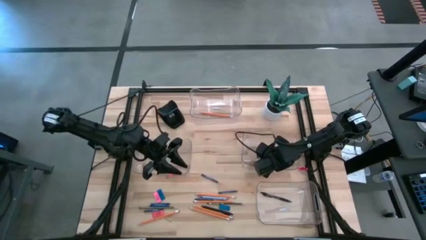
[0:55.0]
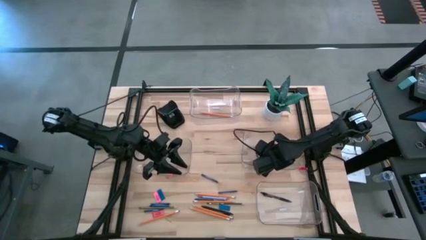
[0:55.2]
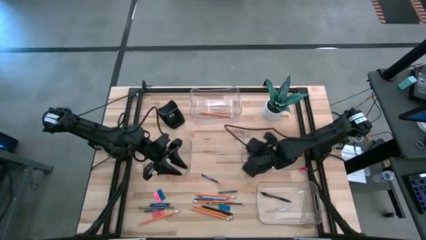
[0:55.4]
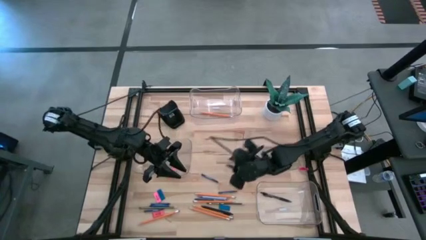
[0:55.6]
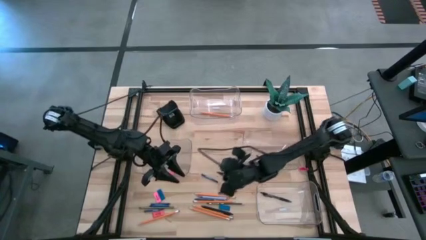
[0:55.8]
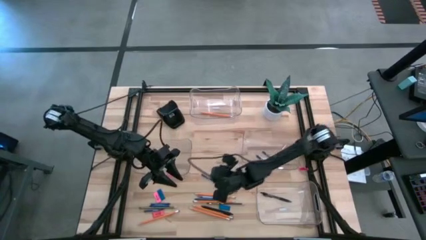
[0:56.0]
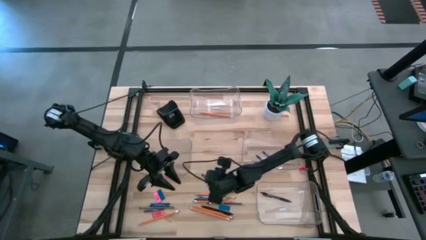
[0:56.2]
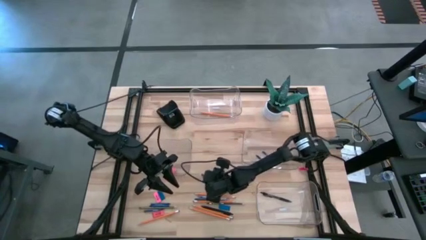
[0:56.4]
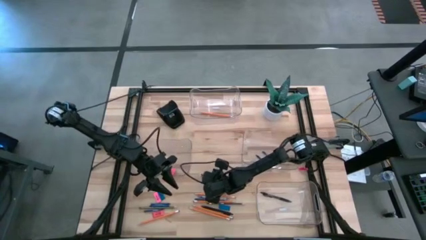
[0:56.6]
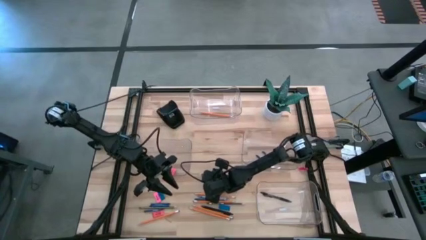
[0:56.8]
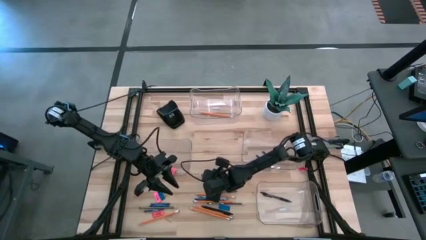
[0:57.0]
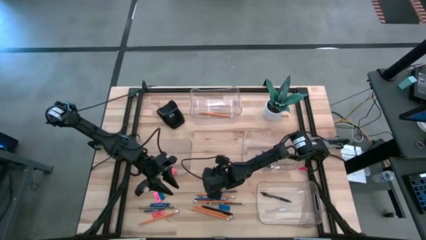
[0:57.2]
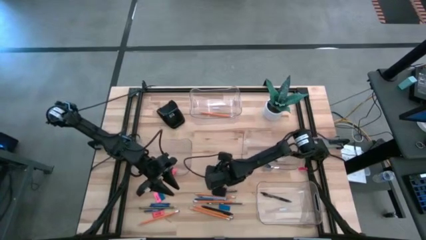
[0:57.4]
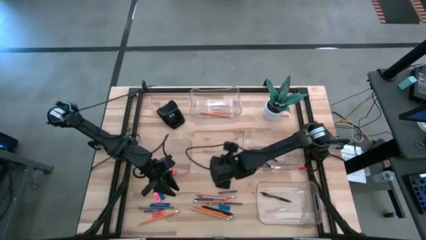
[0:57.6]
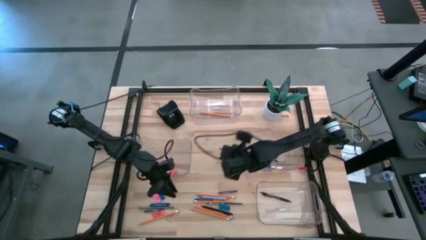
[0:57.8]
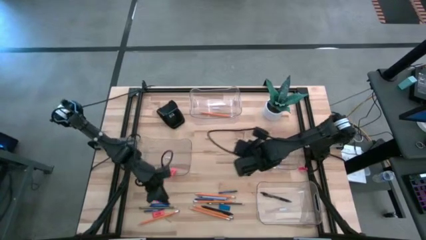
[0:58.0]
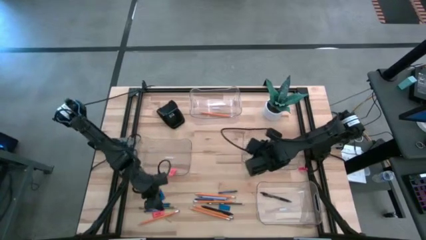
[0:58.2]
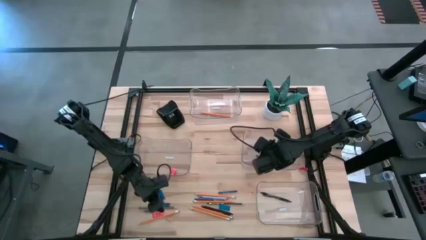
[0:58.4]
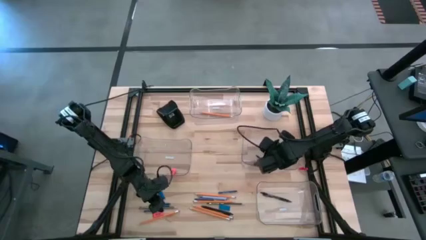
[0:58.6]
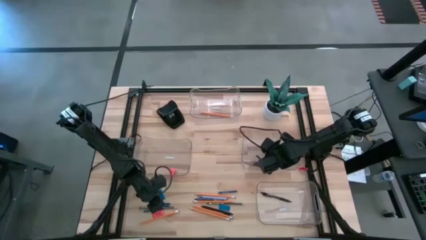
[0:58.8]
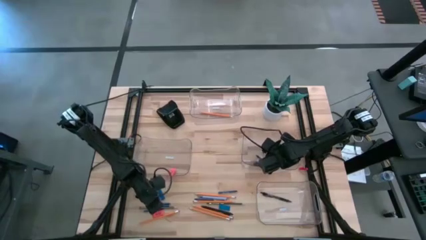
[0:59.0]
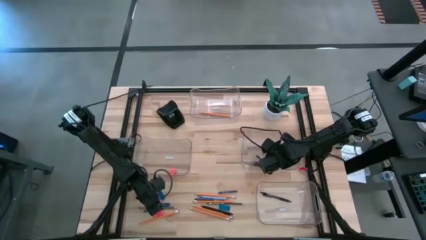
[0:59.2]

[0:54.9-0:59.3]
Task: Sort crayons/erasers/pens/pencils in bins
Put the blue crayon into the middle right transparent bin

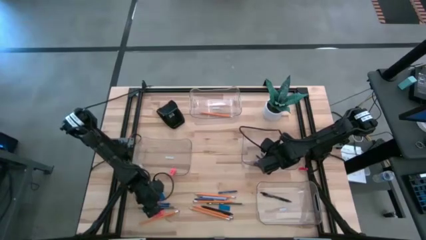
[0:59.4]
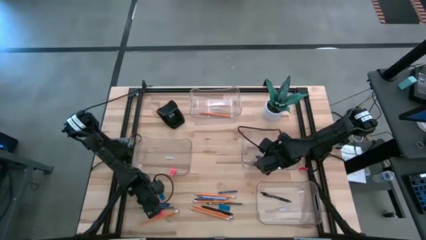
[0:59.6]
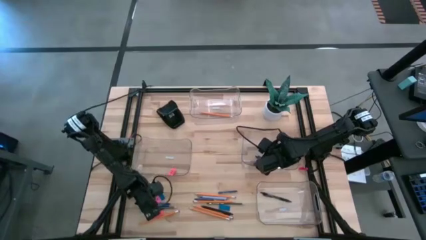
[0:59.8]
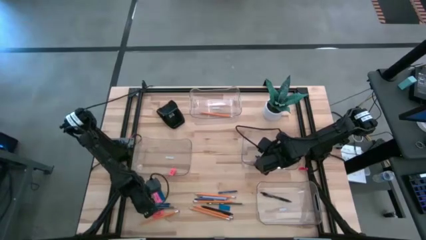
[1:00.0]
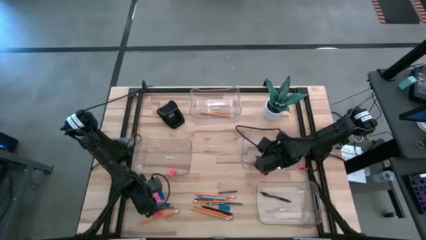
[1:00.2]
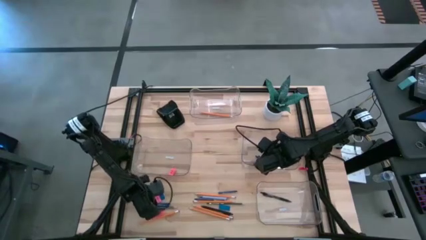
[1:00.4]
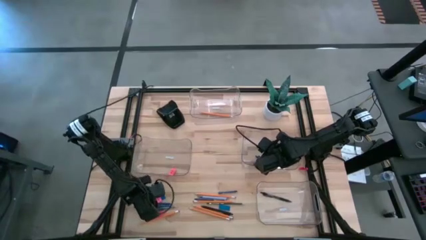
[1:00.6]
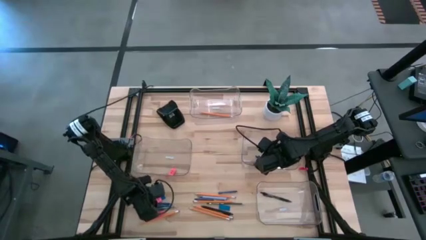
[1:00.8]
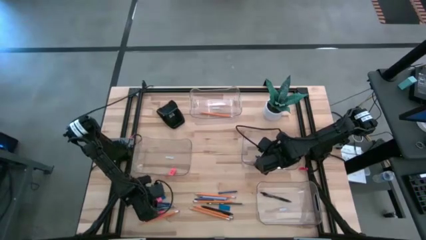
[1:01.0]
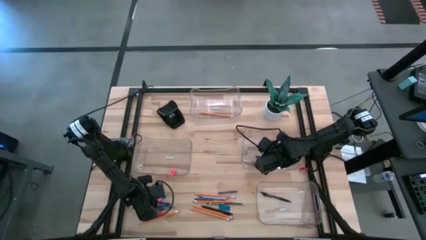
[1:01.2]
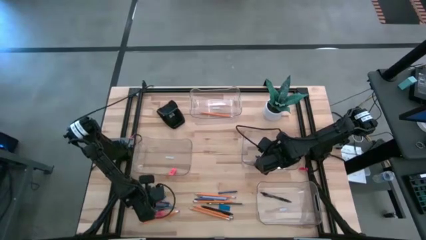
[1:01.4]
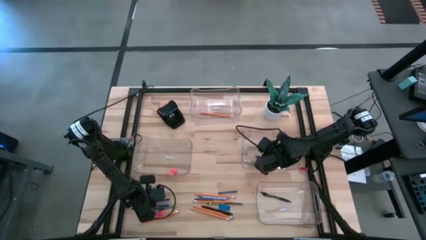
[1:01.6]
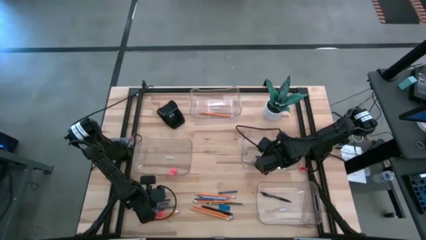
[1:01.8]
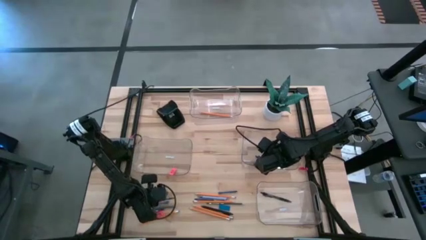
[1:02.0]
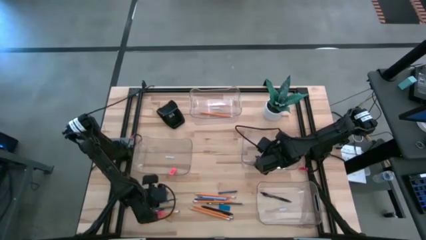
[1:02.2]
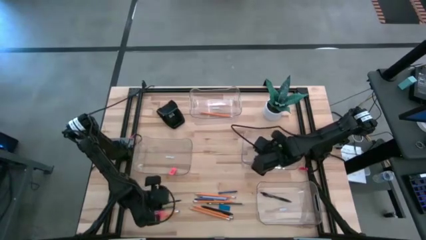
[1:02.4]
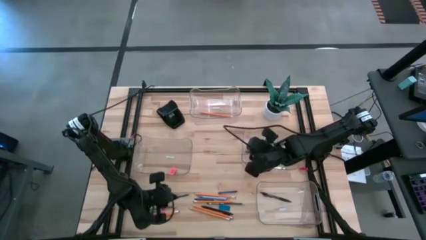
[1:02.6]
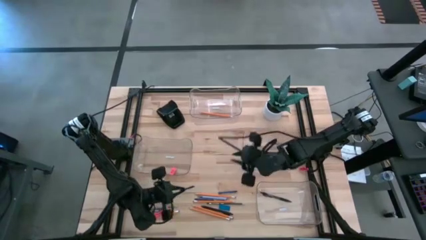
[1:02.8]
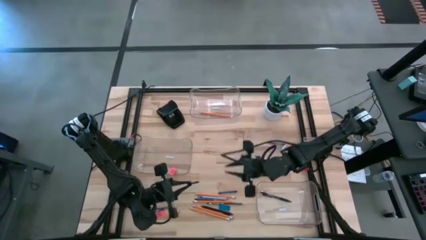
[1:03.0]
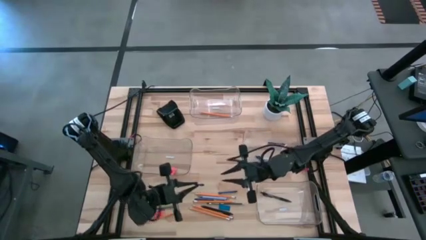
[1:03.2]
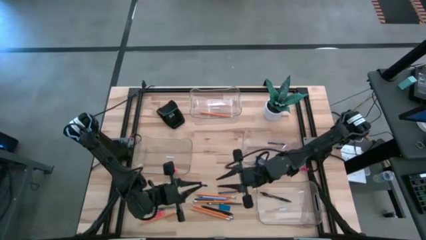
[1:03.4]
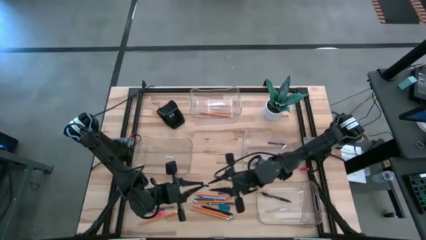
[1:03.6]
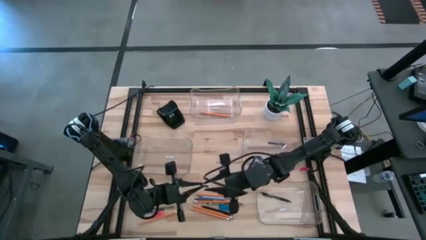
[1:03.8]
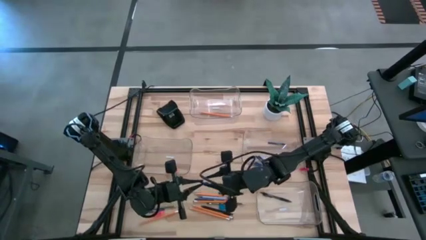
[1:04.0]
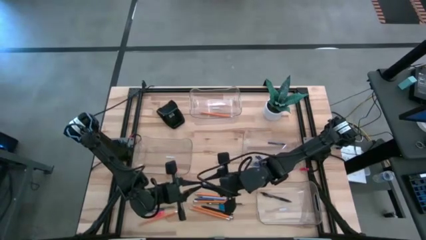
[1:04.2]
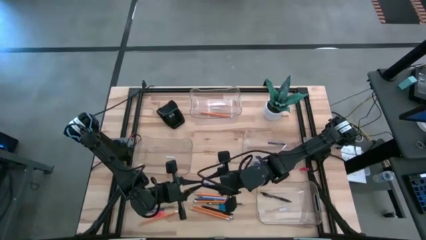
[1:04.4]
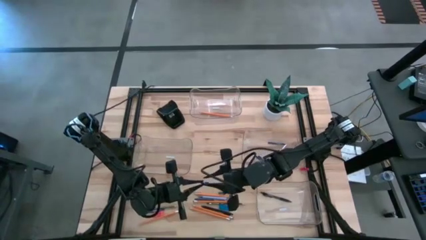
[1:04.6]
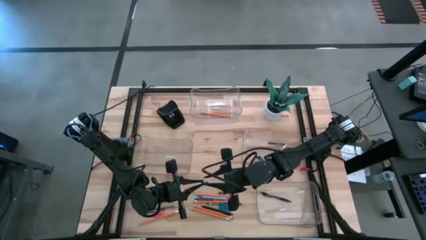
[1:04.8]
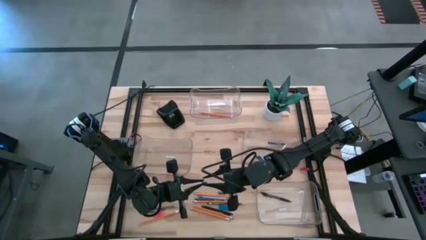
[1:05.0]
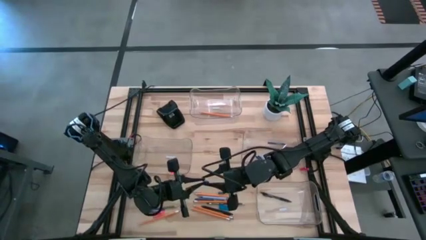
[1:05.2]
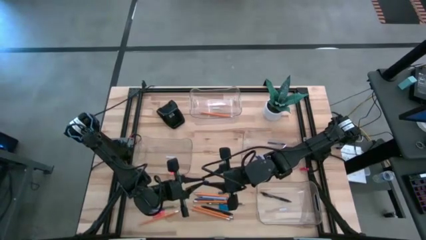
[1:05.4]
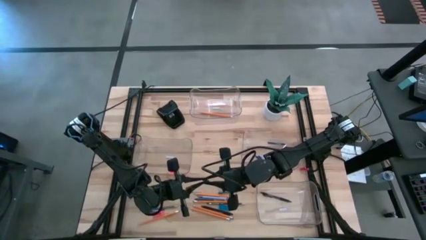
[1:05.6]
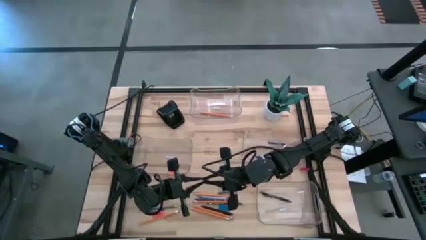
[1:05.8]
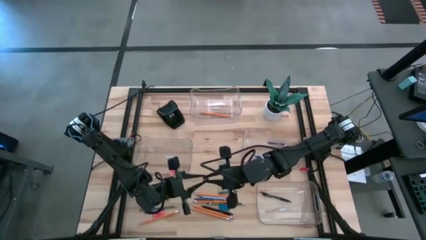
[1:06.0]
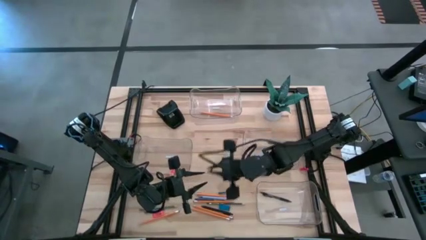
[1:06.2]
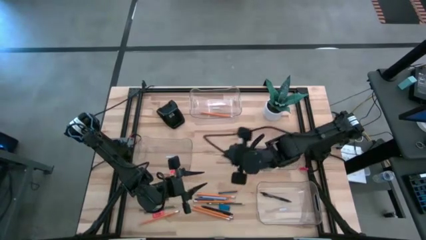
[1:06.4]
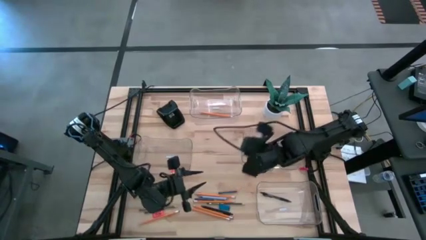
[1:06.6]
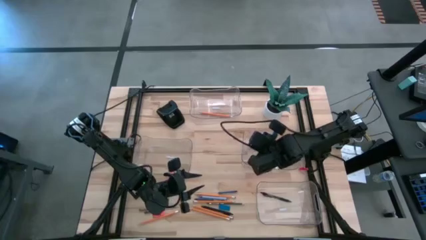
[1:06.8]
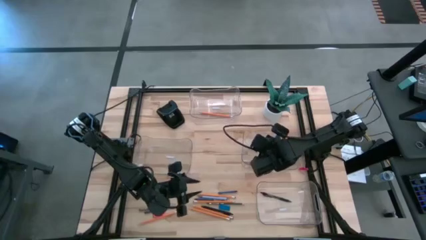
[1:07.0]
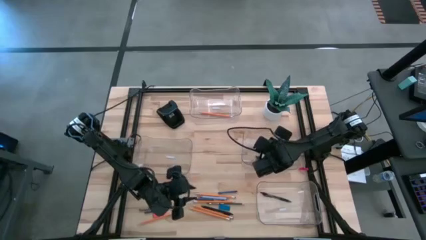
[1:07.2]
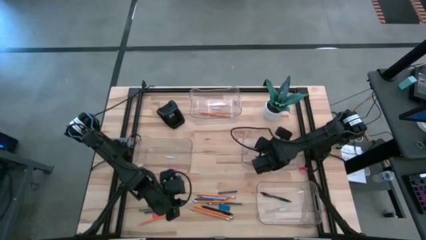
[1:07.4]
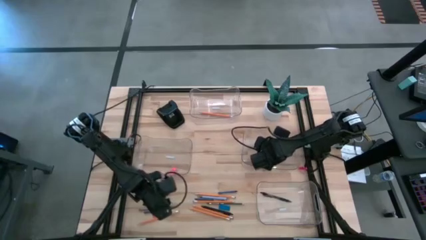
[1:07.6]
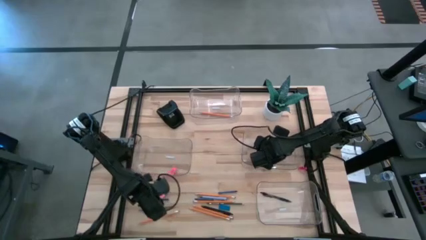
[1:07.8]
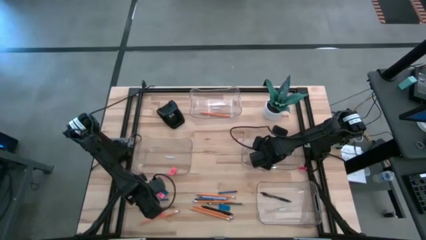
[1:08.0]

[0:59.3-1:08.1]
Put the blue crayon into the middle right transparent bin

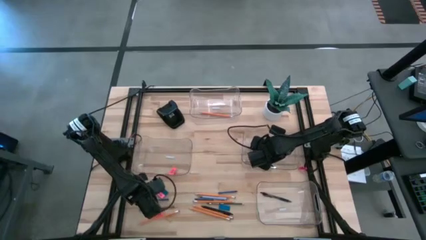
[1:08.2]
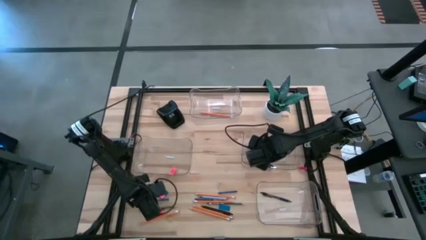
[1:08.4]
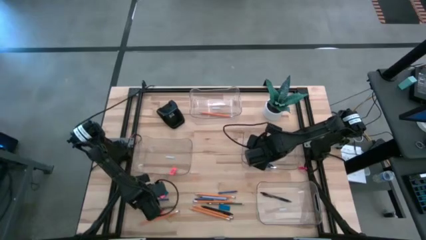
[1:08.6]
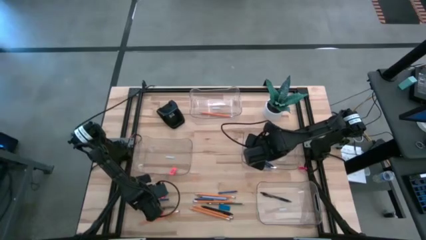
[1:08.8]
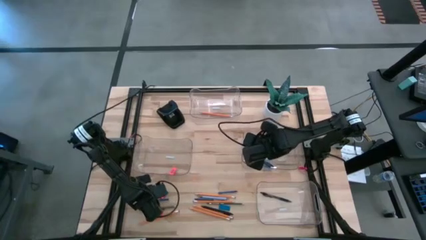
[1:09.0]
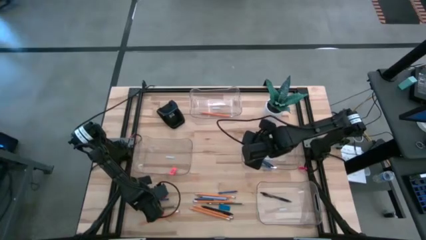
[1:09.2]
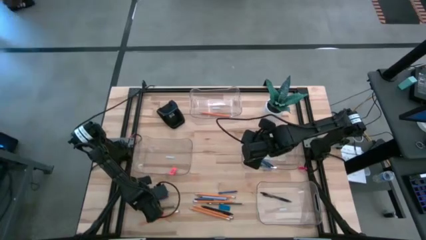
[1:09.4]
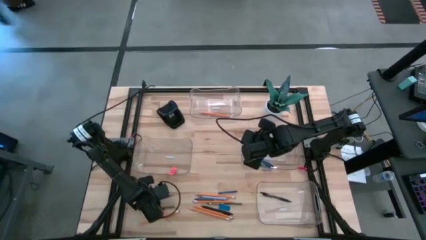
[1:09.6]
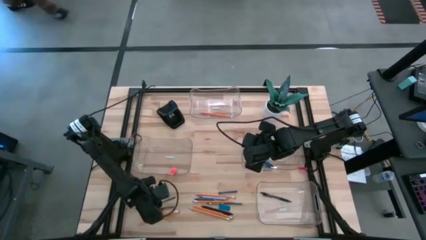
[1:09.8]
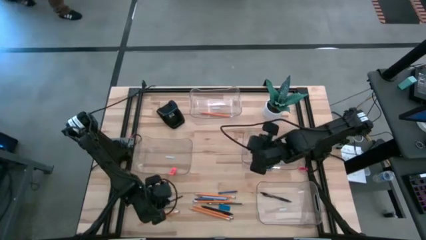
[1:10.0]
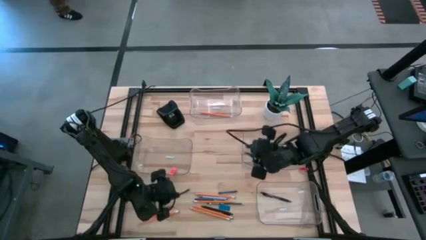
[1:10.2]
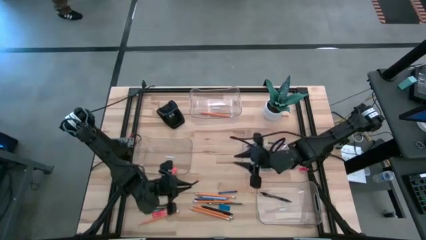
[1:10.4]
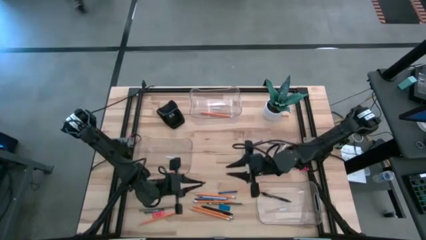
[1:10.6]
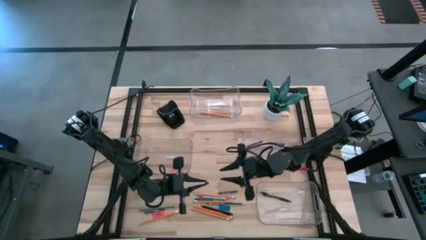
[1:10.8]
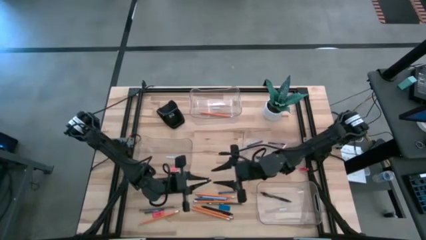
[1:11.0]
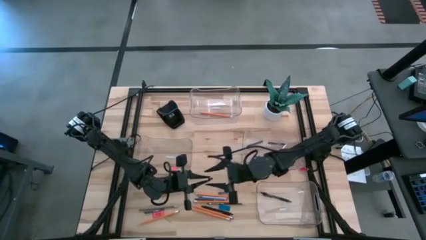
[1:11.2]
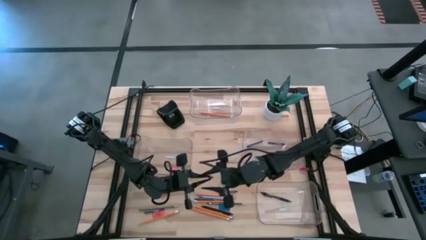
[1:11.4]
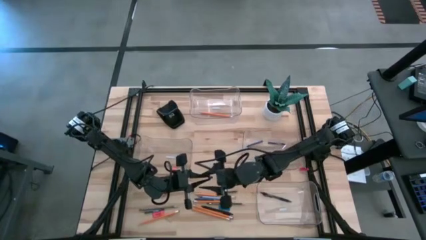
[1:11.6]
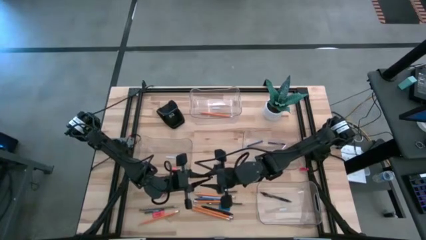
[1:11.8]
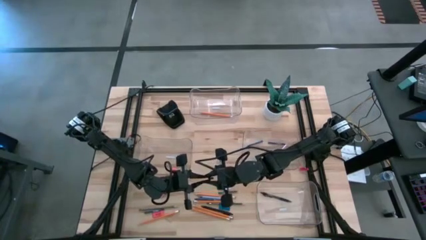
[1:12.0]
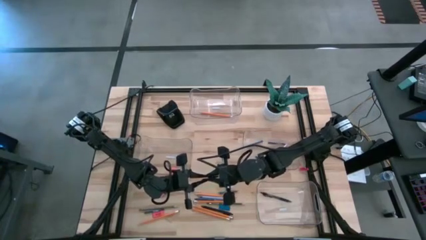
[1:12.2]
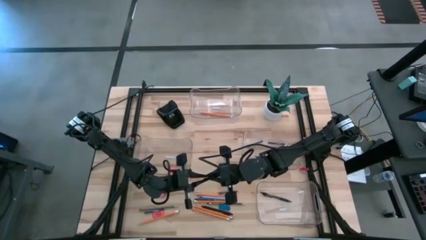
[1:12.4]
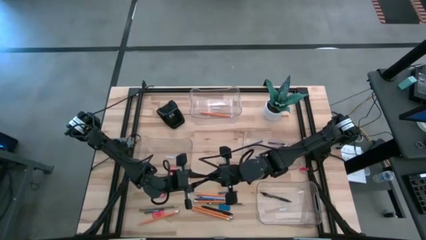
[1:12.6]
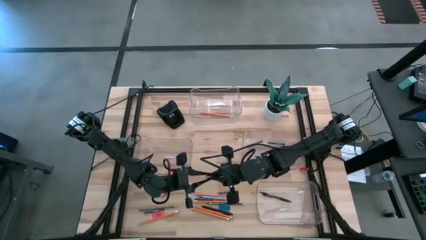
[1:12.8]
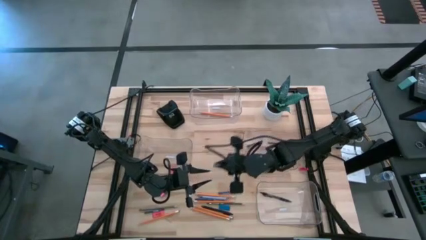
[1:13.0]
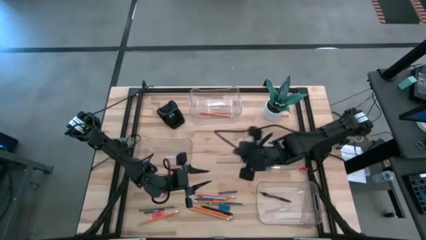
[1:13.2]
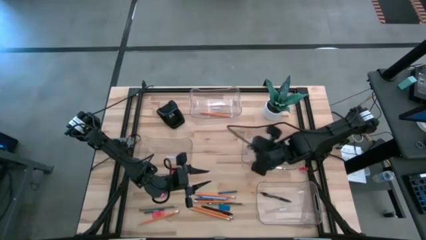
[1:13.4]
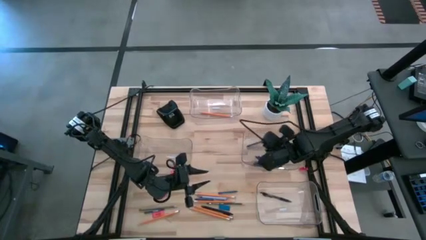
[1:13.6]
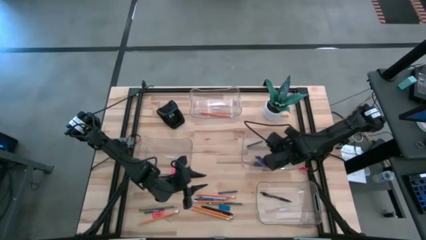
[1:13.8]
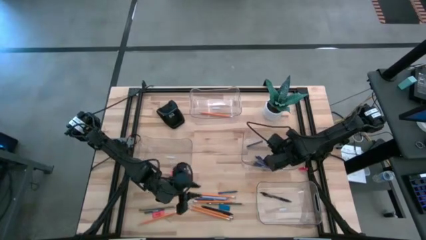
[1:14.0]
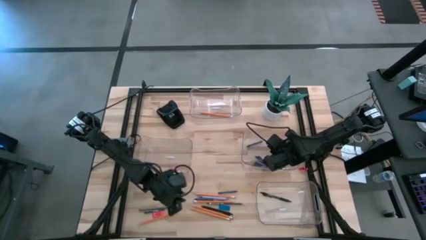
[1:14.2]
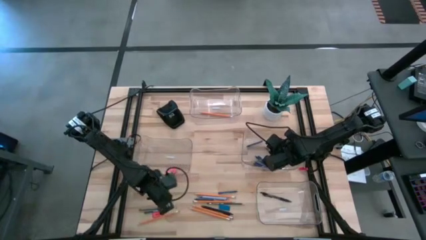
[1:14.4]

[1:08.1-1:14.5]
Put the blue crayon into the middle right transparent bin
